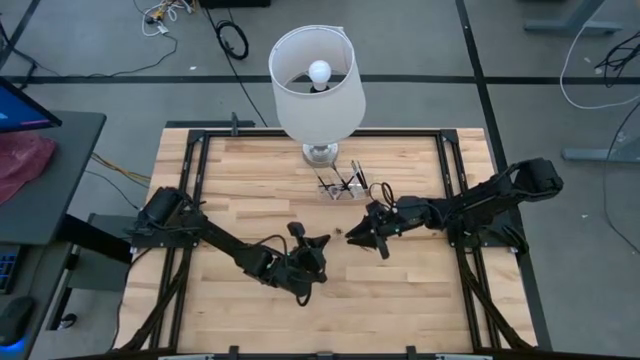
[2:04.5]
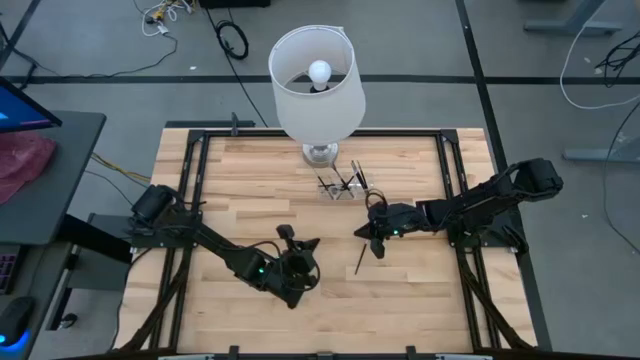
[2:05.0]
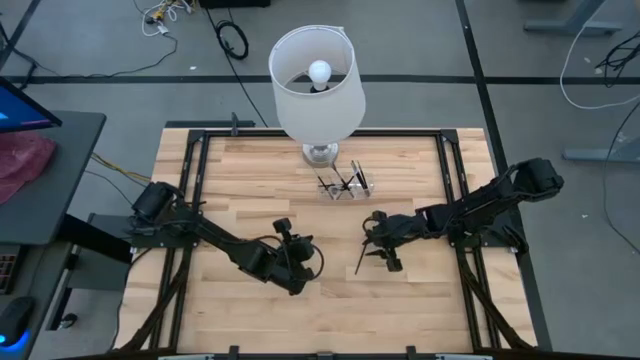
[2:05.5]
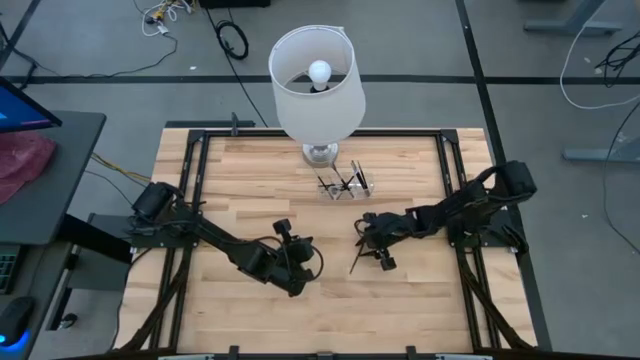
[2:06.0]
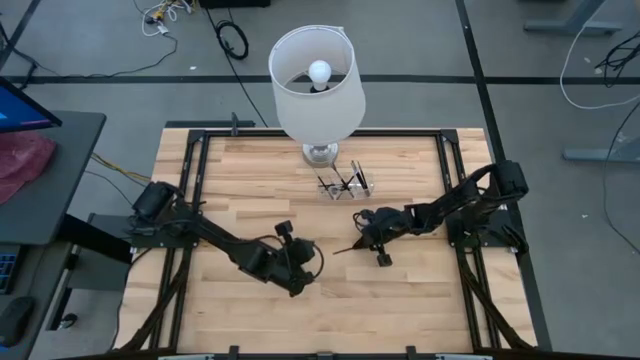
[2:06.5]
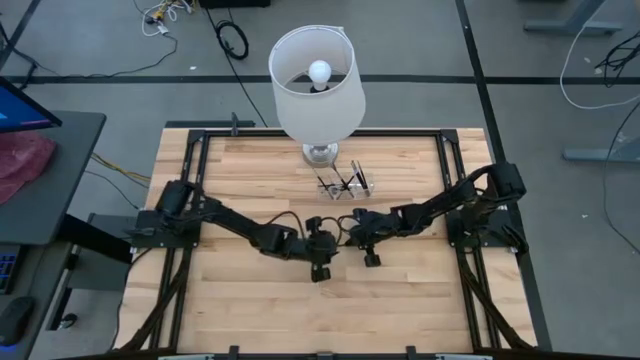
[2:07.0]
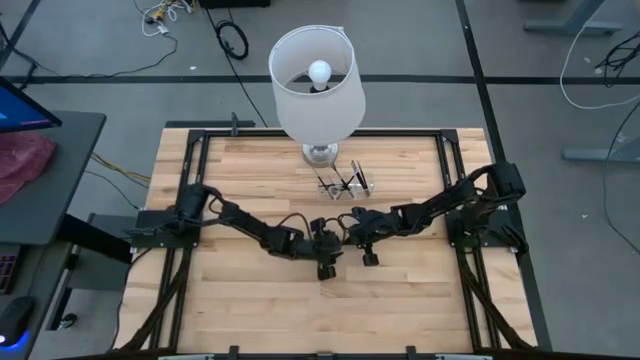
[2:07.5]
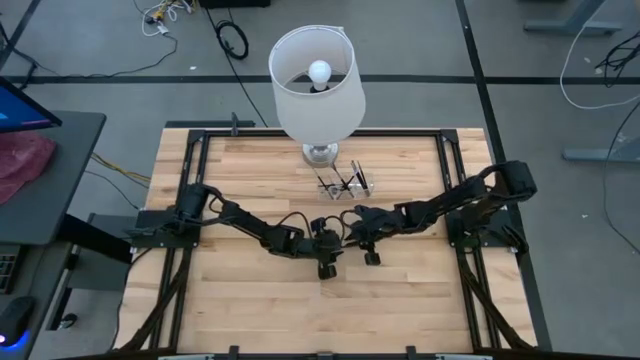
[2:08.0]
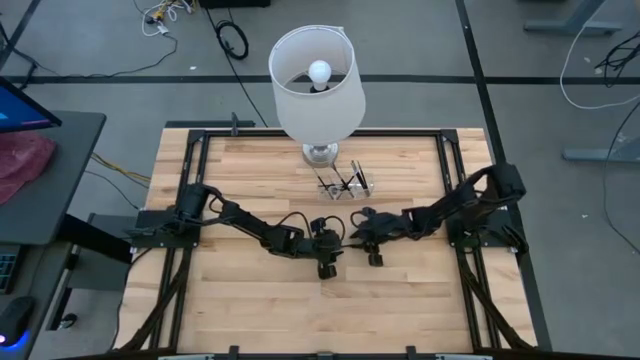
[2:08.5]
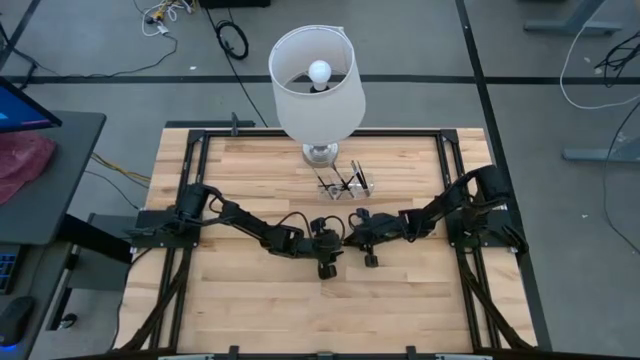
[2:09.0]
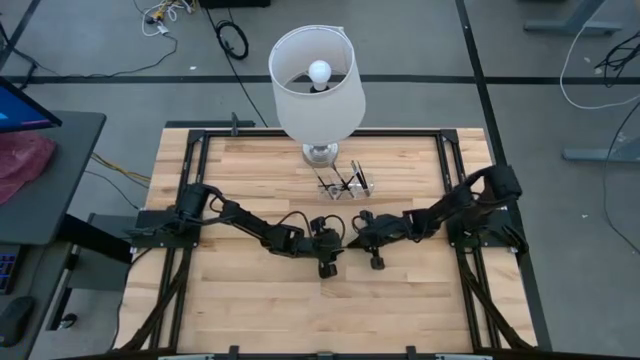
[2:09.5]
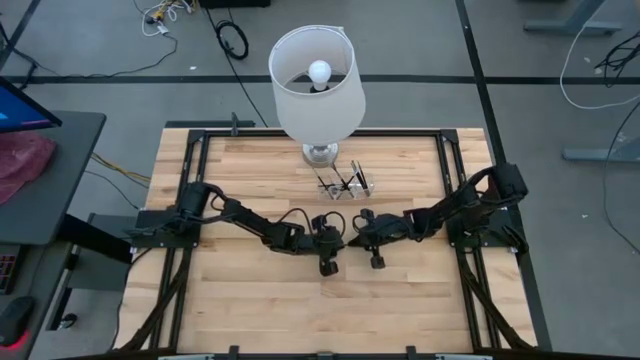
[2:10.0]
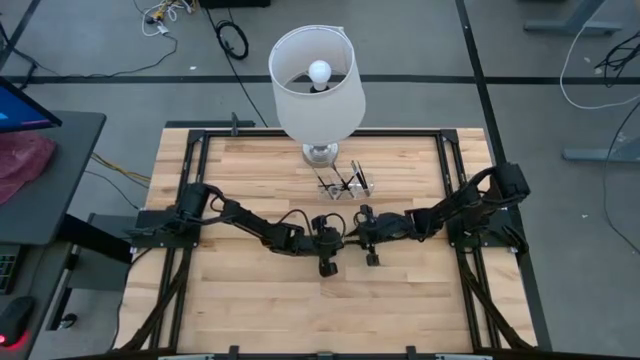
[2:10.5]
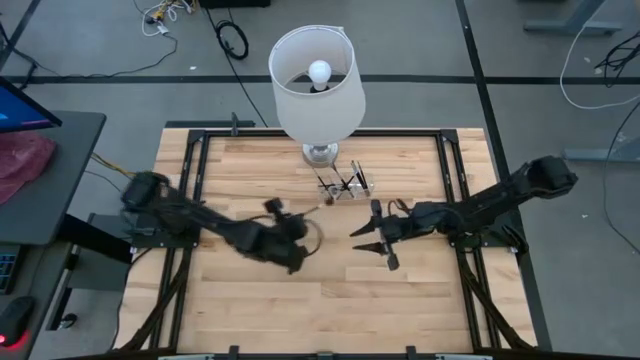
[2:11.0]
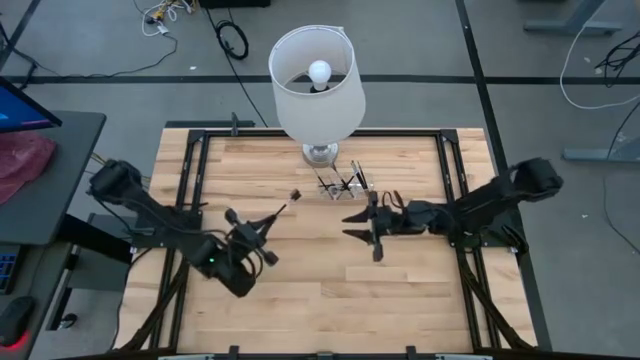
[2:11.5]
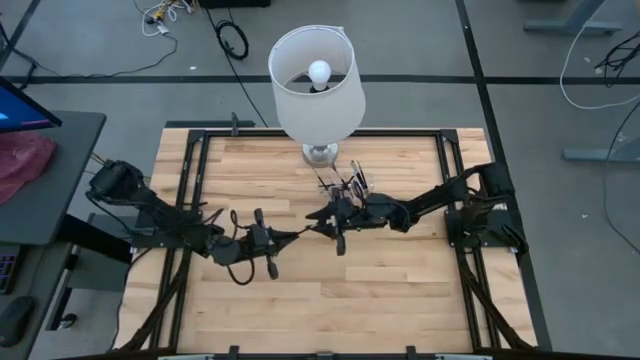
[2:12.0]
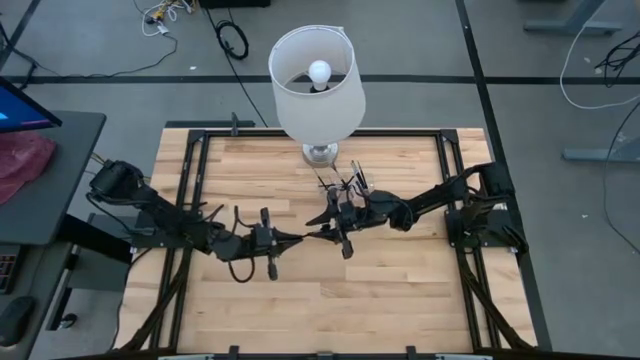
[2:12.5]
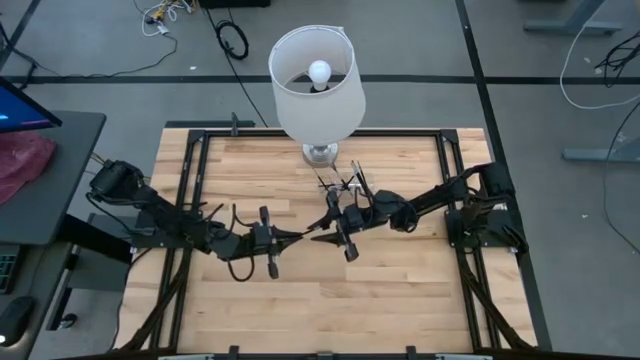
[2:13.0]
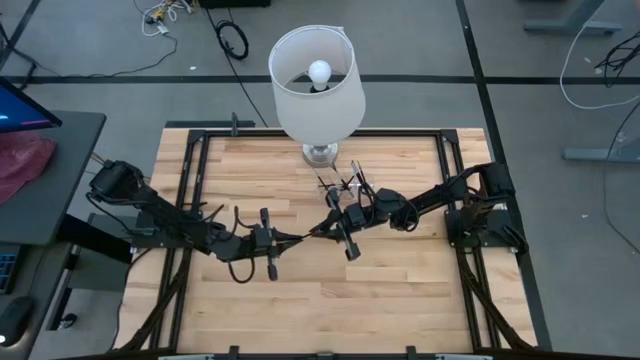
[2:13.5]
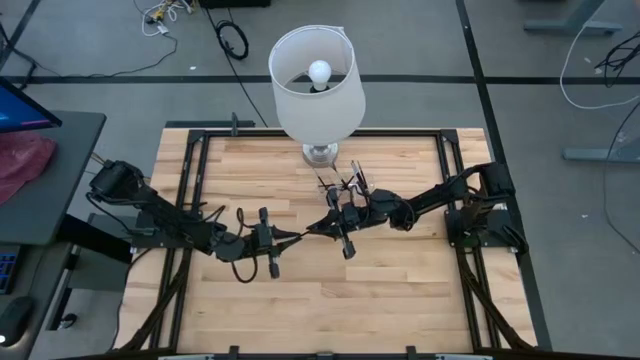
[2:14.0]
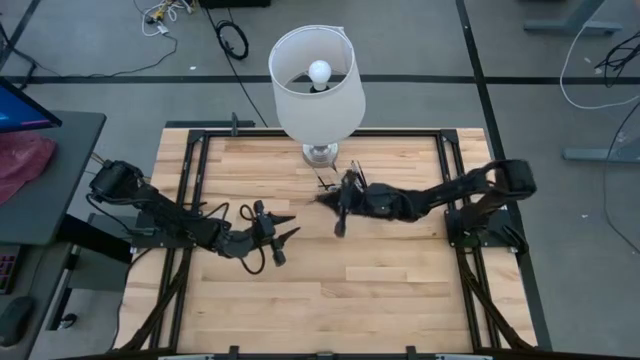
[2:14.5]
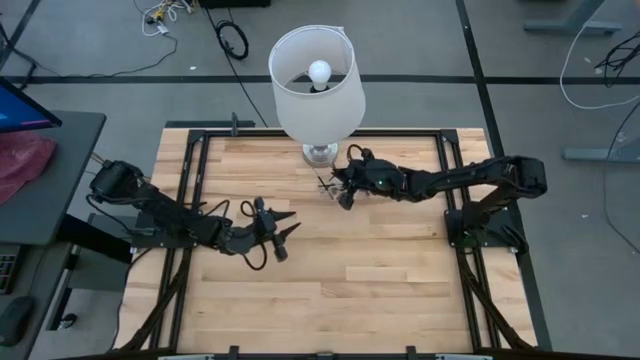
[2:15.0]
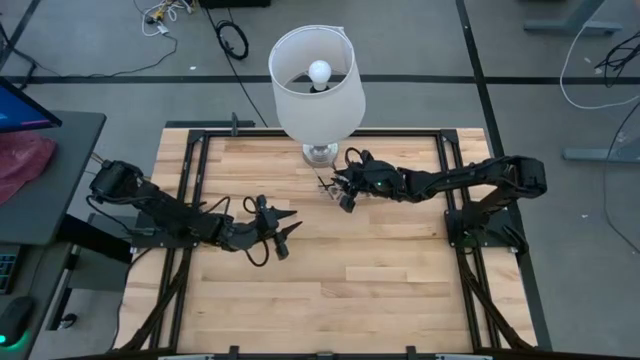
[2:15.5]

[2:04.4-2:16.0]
Task: Put items in baskets/containers
Put the black brow brush into the transparent organizer

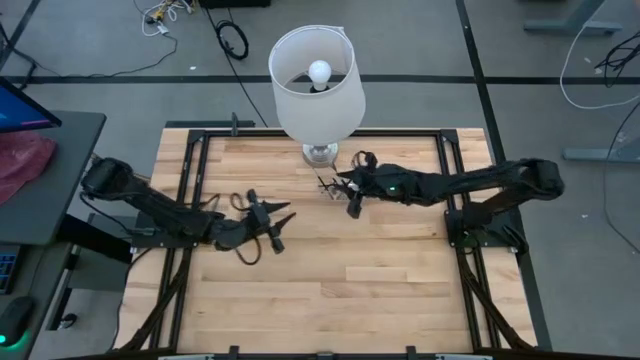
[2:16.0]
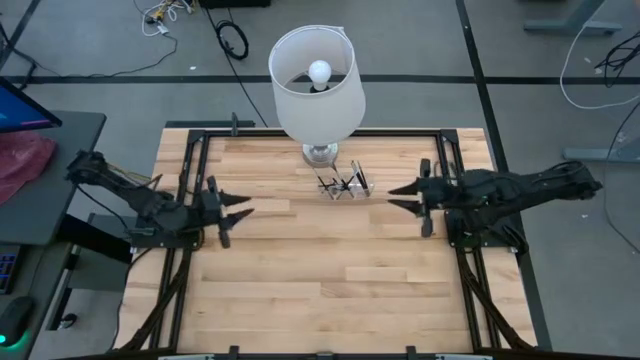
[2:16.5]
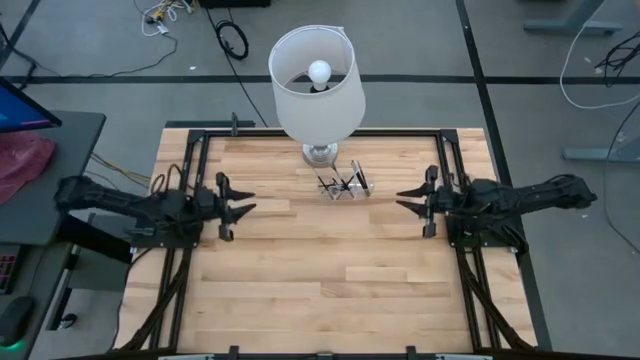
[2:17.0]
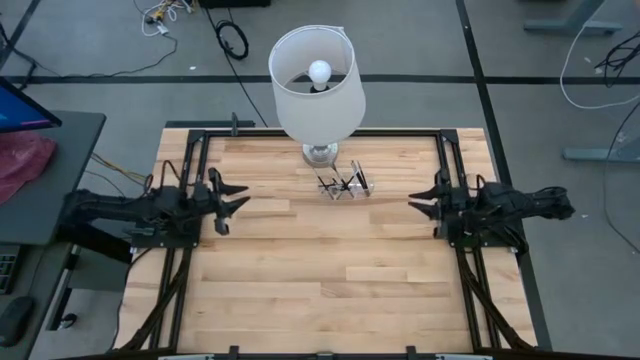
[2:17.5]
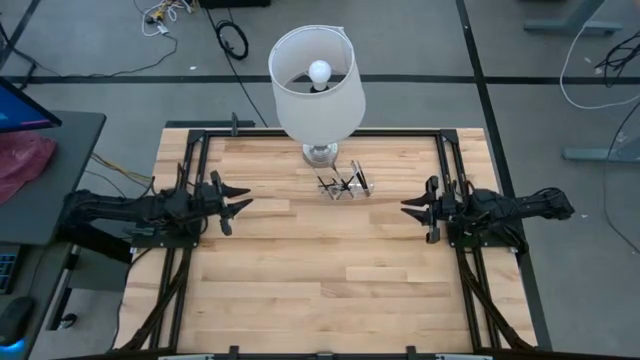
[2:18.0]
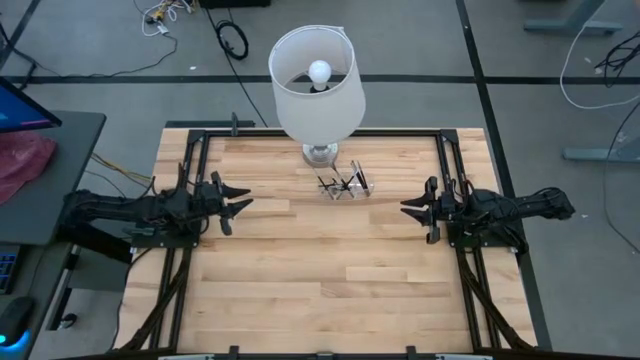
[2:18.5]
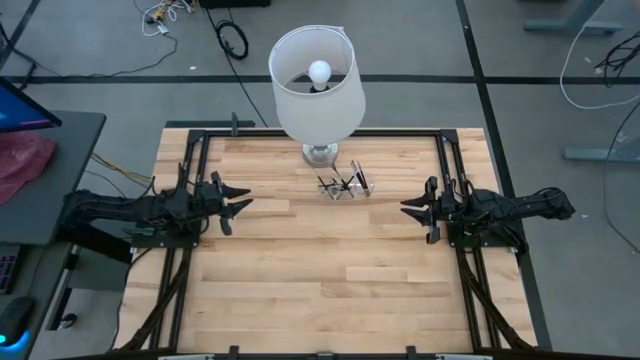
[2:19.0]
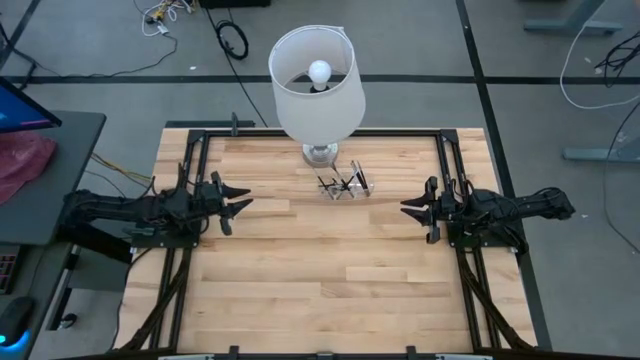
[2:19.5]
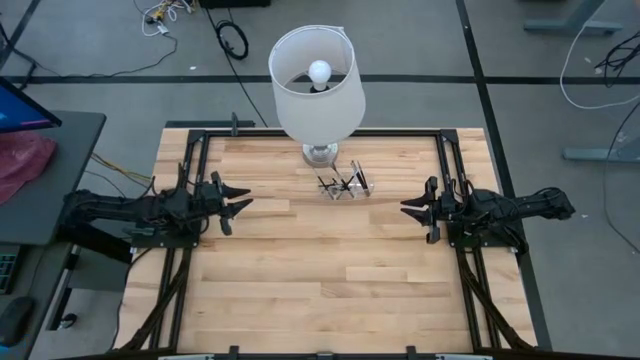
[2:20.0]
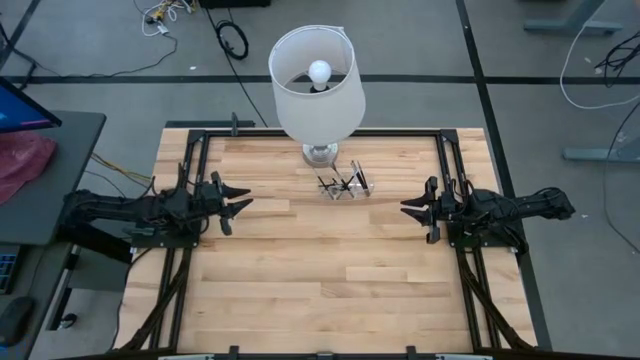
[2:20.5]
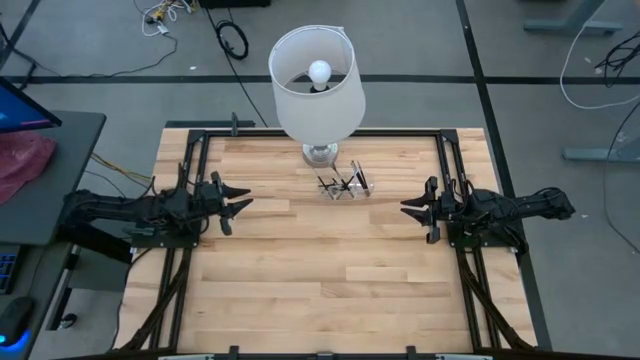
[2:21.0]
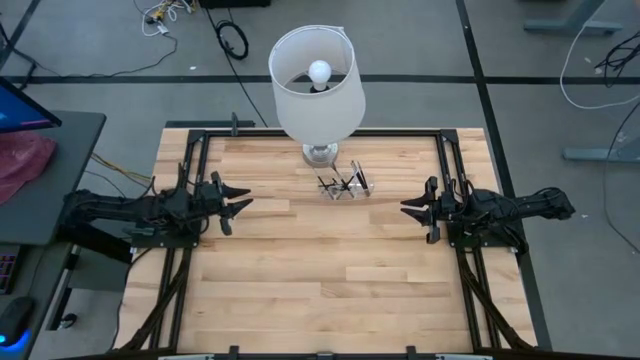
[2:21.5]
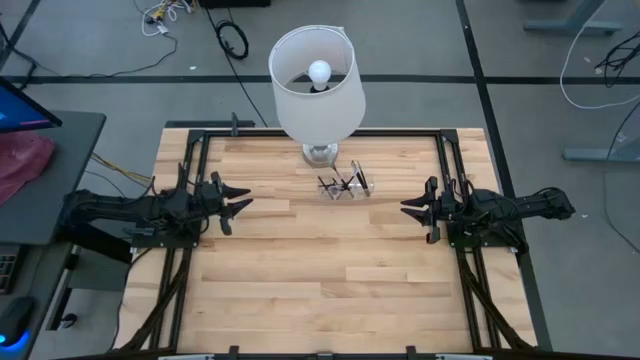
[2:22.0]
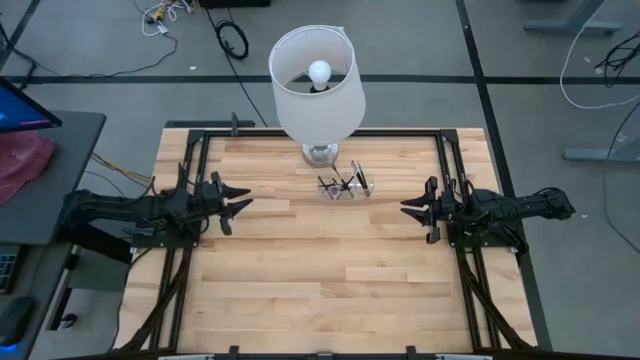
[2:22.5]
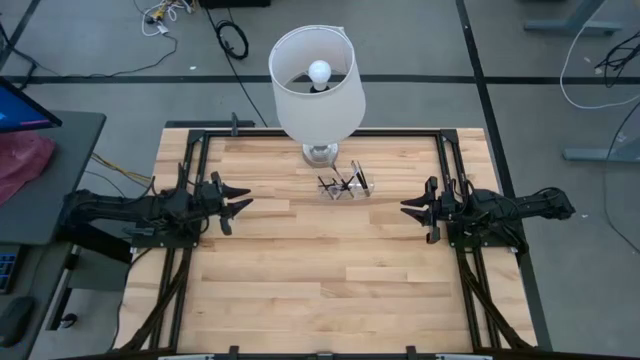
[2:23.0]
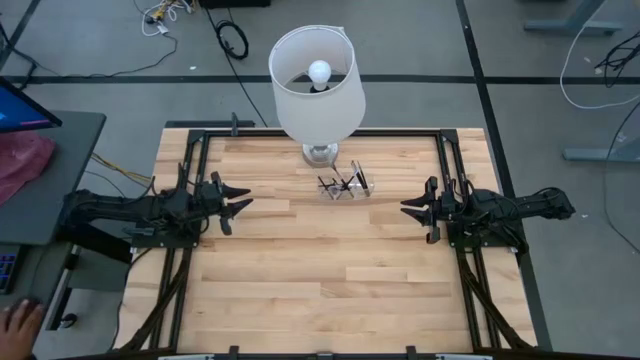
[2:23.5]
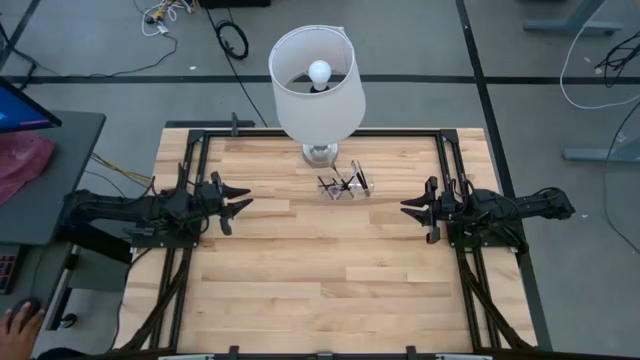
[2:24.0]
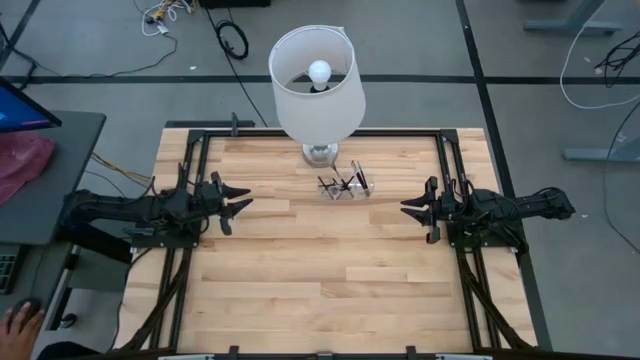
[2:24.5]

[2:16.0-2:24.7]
Return to Home Position
